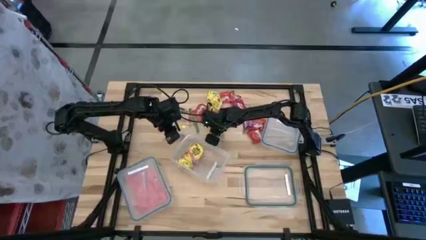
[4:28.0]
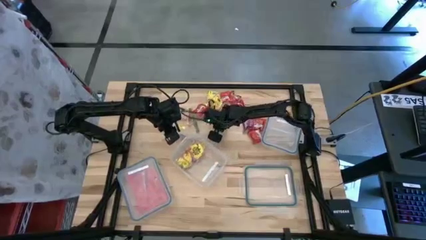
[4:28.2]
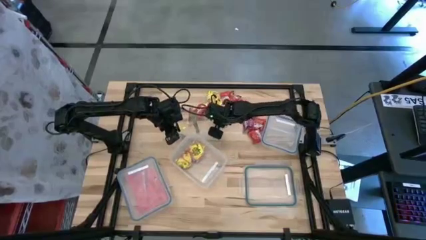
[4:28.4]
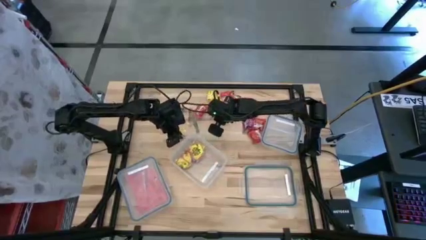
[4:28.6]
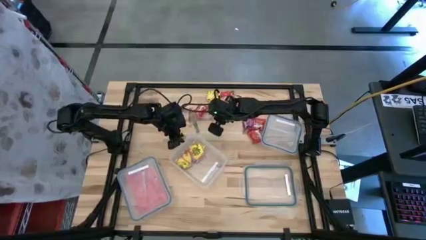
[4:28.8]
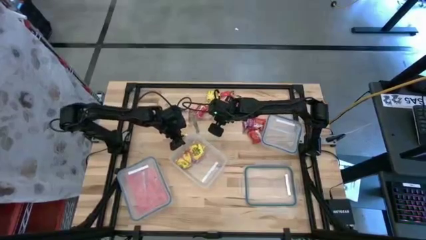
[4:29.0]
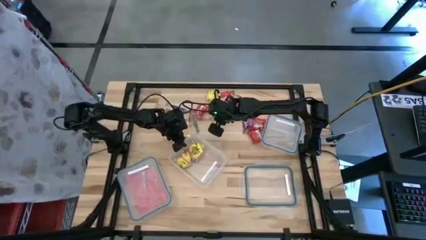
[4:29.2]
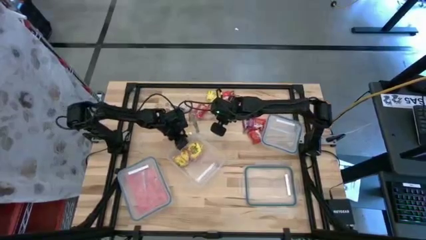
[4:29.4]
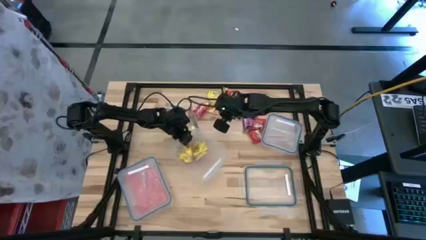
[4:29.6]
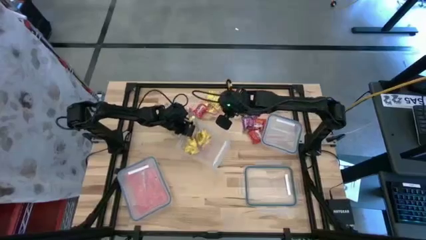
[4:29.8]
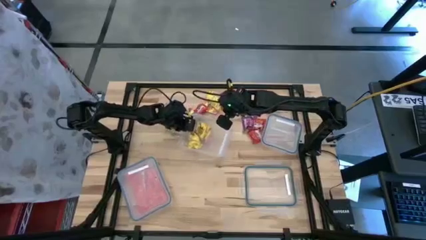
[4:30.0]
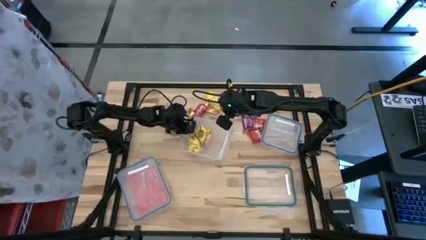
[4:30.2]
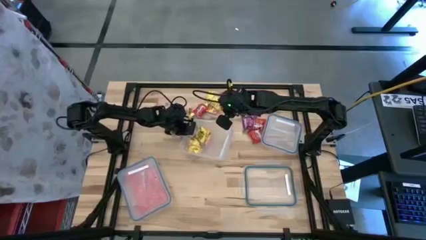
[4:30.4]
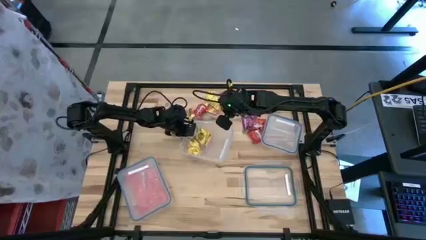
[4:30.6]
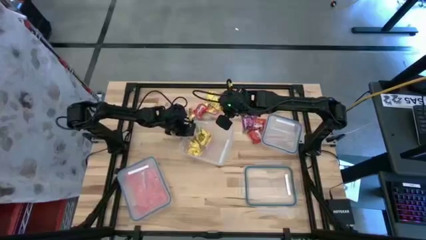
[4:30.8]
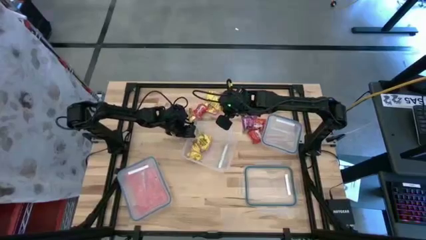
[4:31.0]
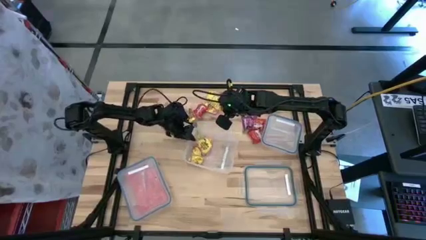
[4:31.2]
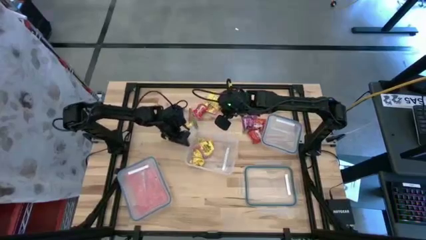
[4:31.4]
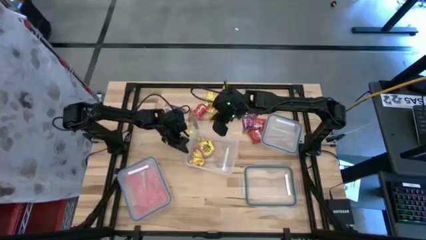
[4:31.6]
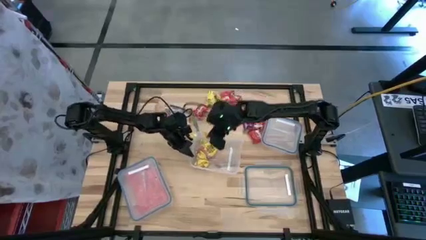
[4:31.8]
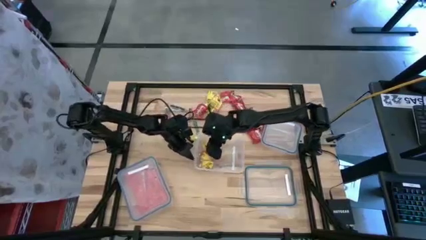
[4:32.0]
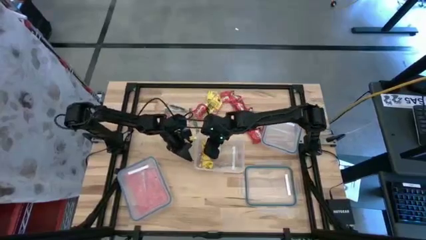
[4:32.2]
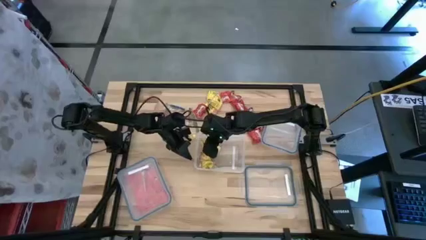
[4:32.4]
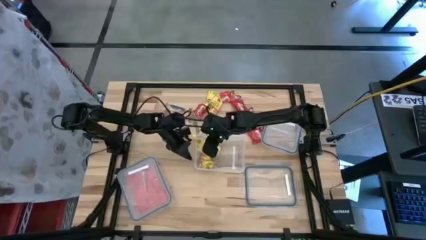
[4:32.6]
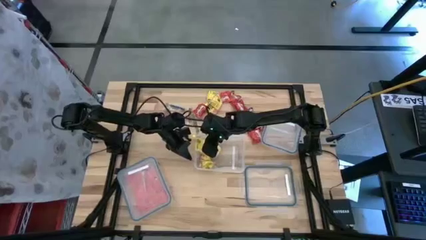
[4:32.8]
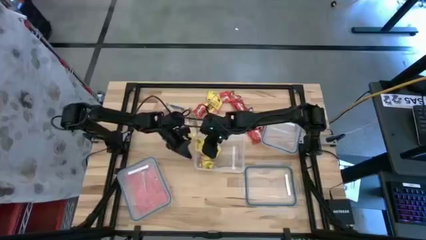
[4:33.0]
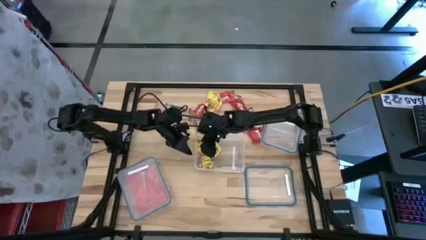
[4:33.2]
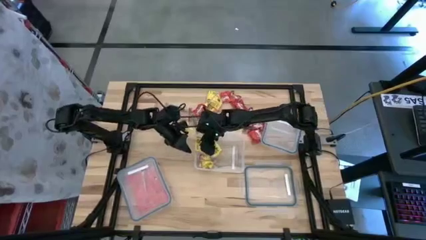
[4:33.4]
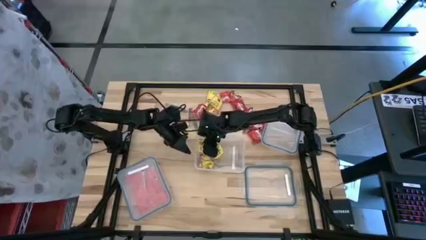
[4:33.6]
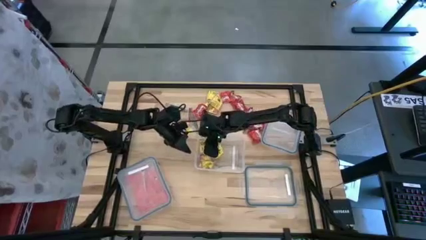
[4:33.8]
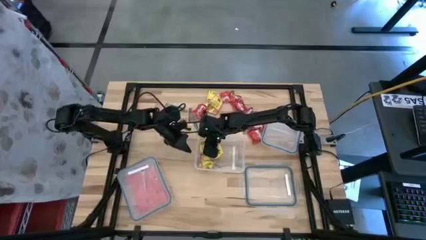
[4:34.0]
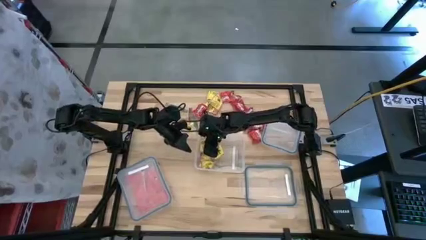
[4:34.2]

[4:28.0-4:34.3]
Task: Sort candy
Put the yellow candy into the rectangular transparent bin

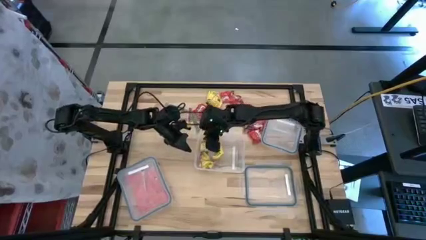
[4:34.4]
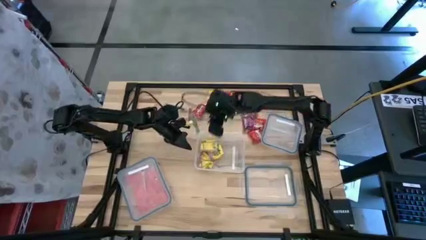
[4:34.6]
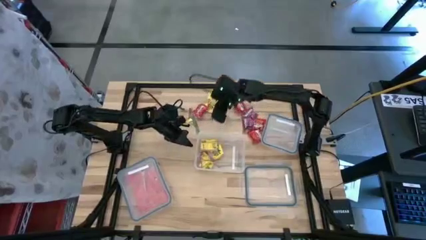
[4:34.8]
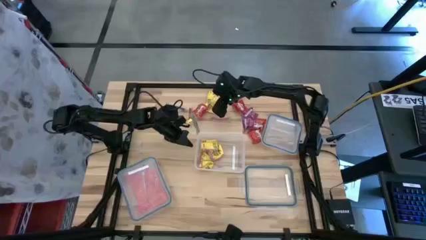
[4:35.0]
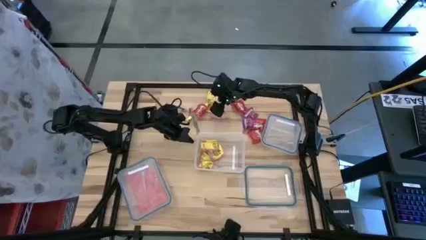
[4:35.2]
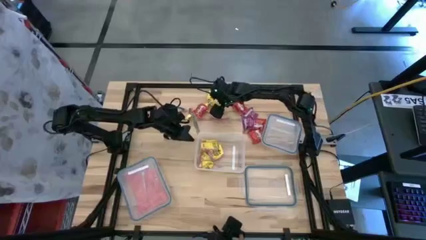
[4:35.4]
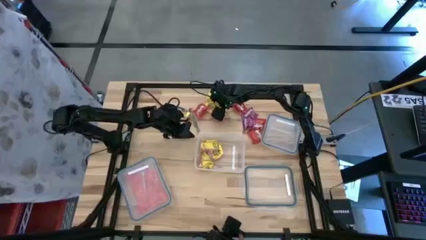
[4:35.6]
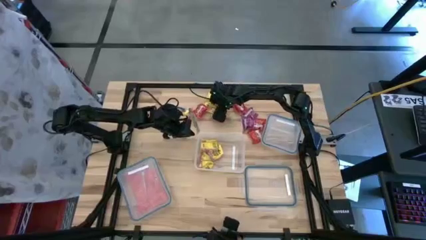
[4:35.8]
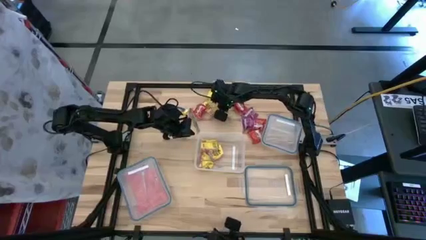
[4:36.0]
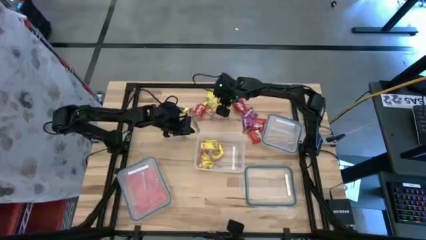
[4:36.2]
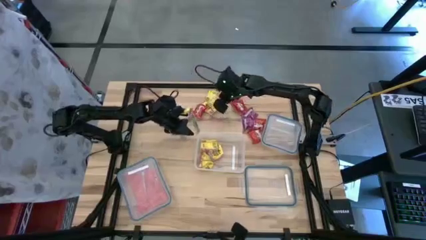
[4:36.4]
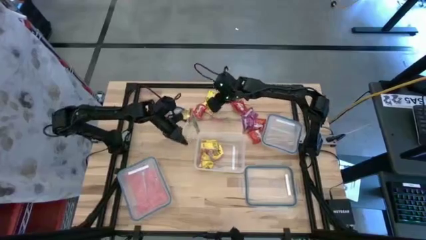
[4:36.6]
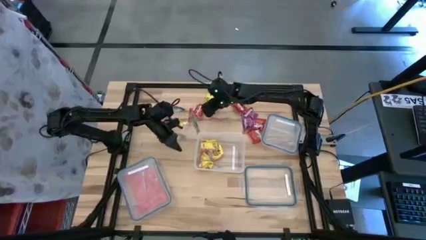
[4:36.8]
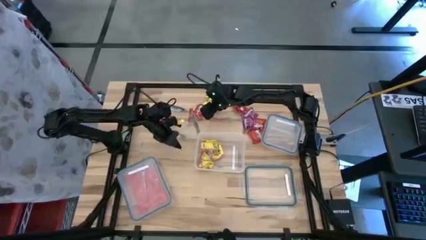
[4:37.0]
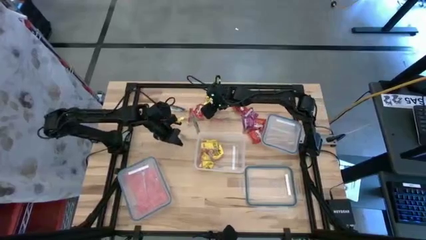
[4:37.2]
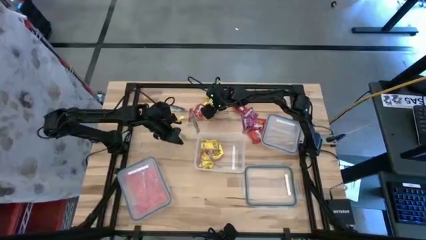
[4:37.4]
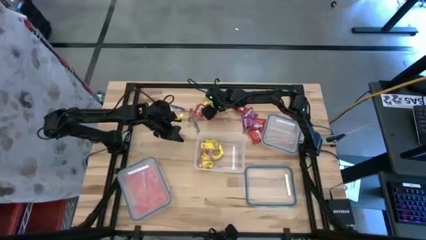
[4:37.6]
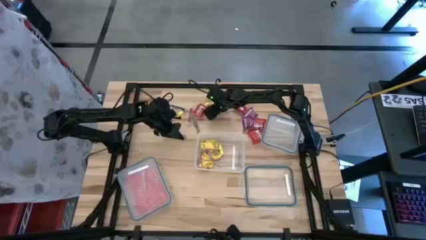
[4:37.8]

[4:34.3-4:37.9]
Put the yellow candy into the rectangular transparent bin

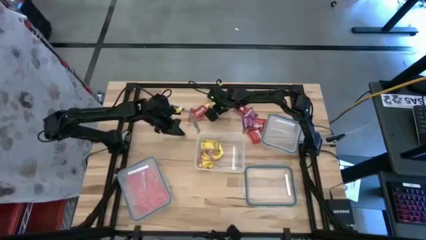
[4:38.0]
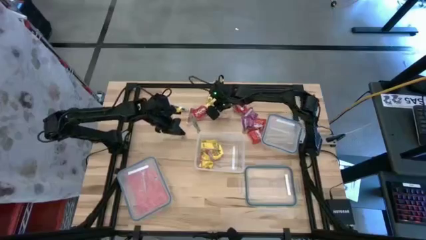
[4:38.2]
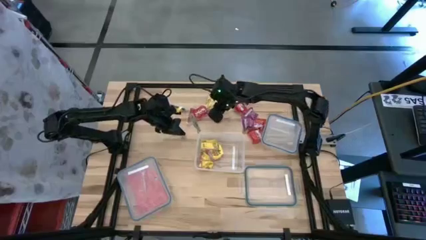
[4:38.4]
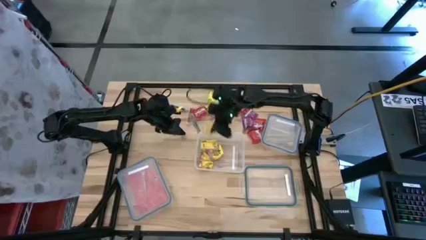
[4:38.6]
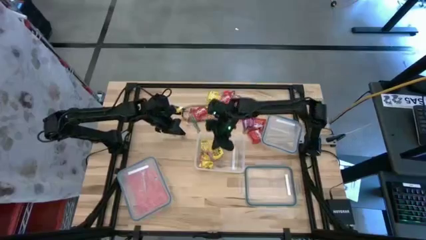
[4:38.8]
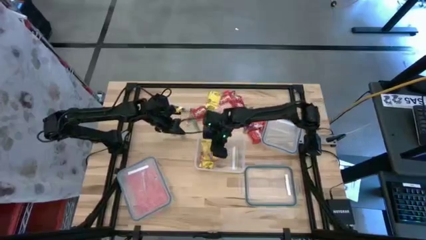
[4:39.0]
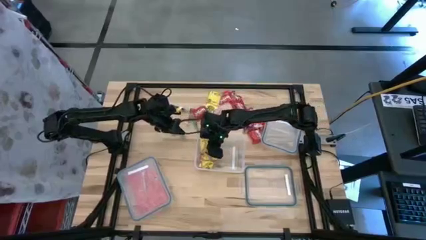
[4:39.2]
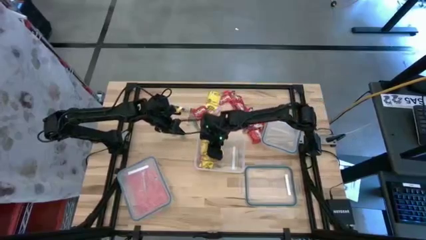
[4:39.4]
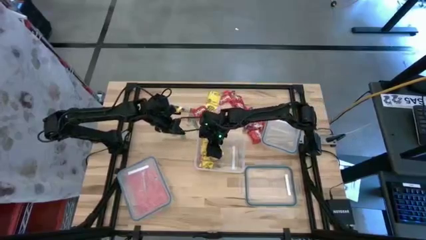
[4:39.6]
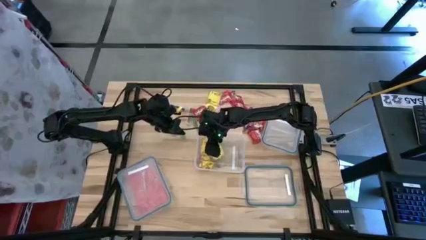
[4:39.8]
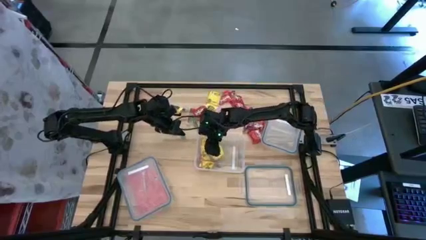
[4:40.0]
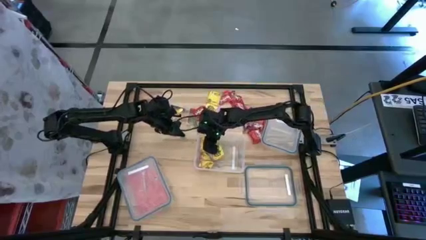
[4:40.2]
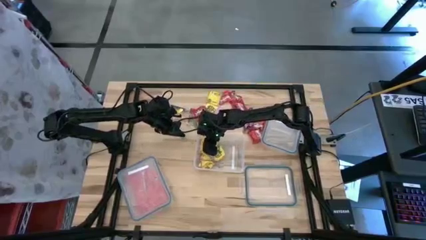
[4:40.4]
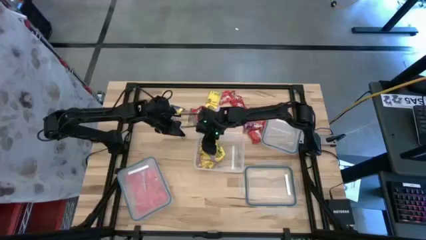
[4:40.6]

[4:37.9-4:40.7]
Put the yellow candy into the rectangular transparent bin

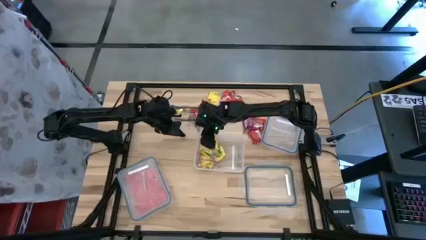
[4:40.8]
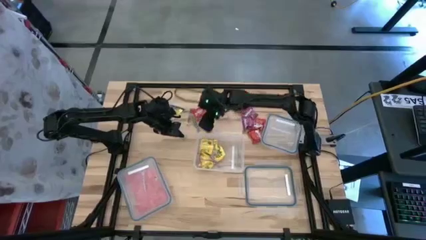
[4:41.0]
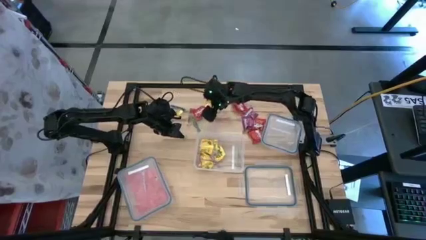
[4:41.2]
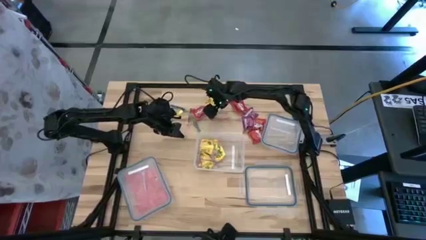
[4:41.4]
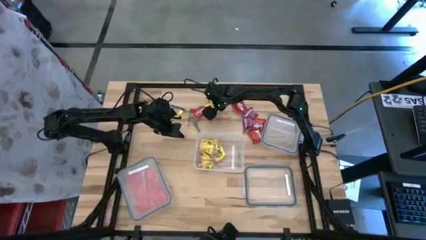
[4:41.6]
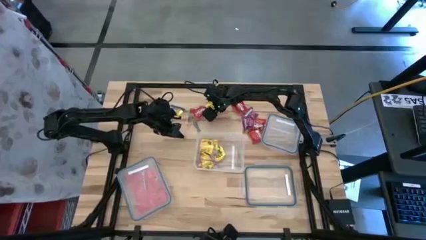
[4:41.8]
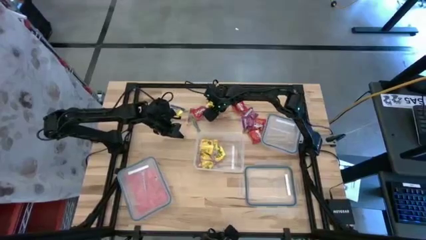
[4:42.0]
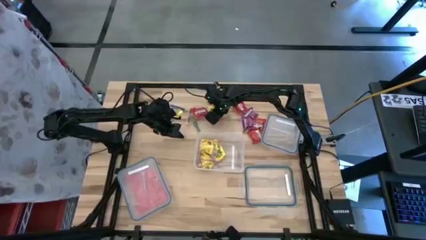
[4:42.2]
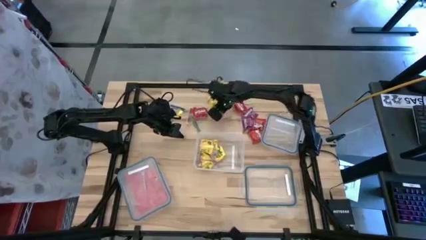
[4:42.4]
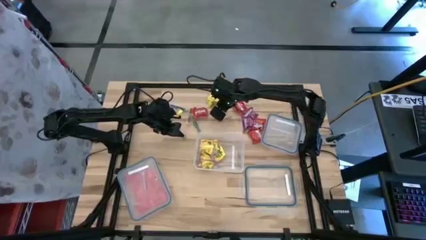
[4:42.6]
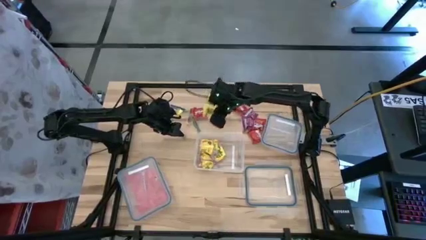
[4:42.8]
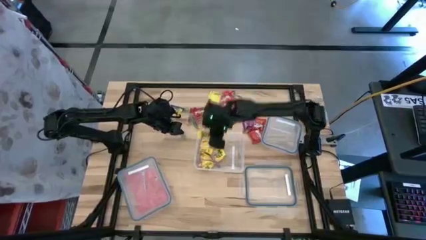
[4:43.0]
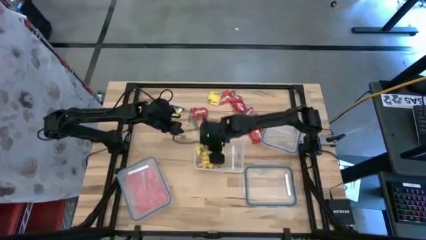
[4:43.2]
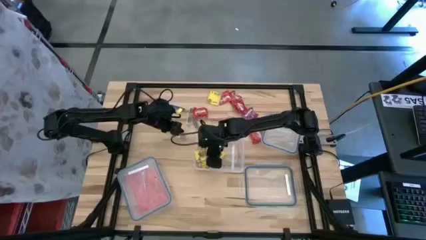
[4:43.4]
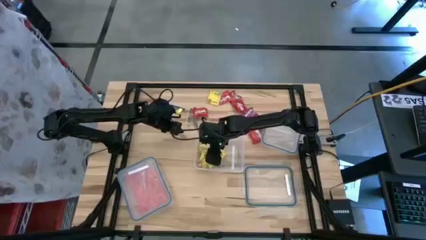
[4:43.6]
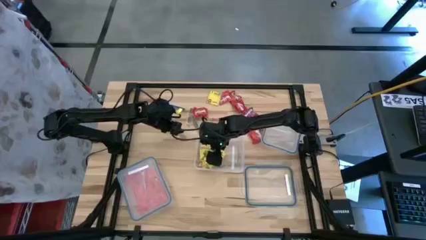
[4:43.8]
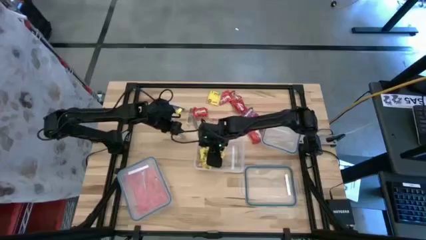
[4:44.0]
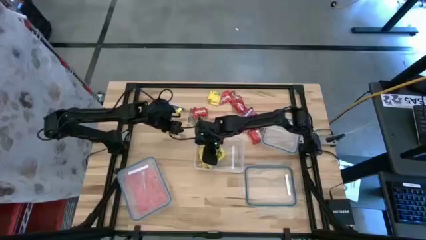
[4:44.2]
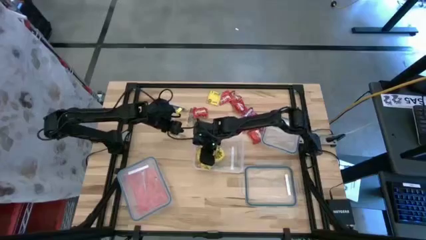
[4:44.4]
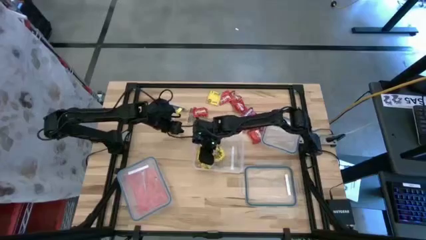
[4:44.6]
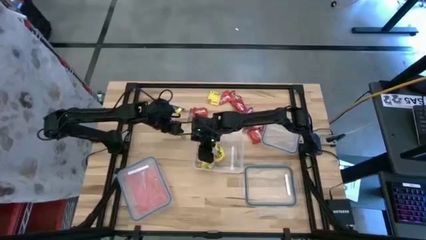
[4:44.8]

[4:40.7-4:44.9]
Put the yellow candy into the open transparent container
